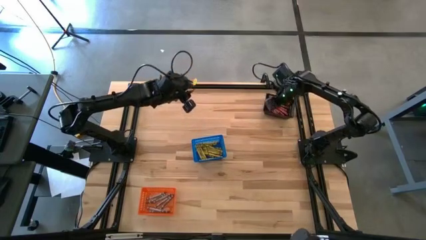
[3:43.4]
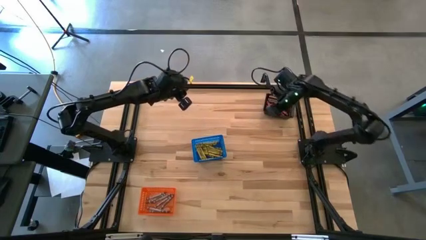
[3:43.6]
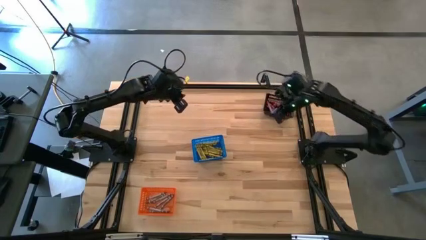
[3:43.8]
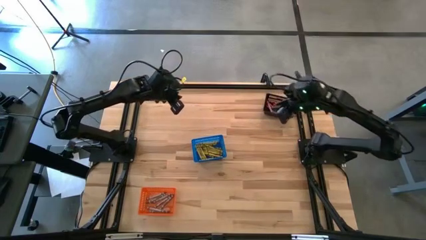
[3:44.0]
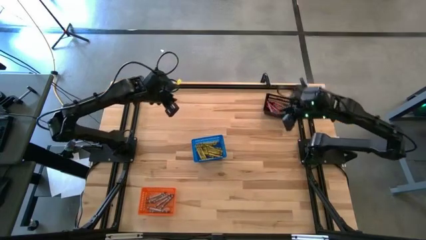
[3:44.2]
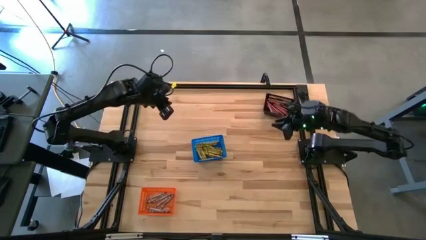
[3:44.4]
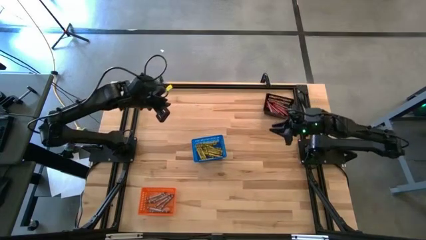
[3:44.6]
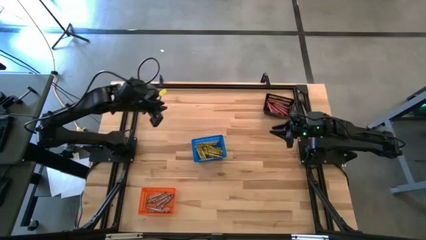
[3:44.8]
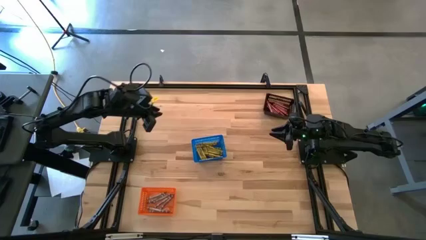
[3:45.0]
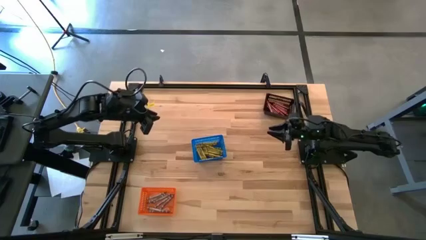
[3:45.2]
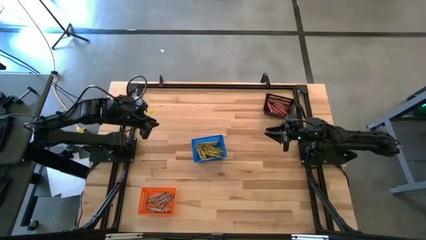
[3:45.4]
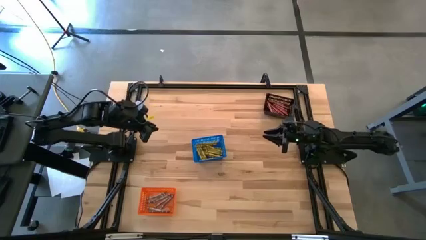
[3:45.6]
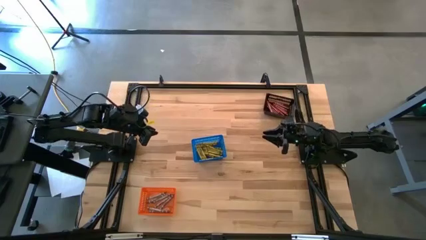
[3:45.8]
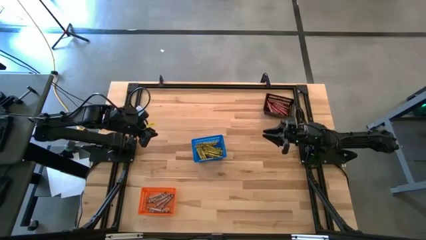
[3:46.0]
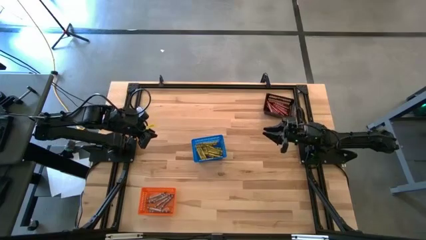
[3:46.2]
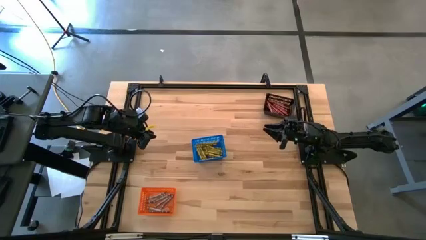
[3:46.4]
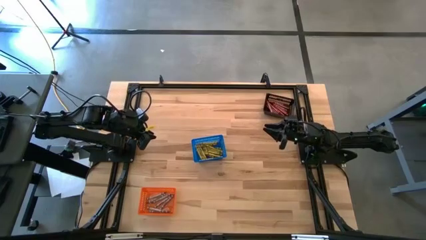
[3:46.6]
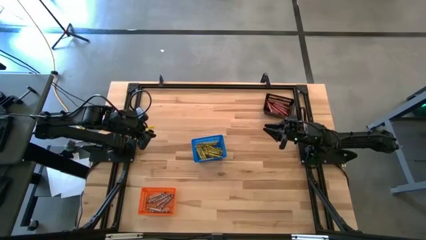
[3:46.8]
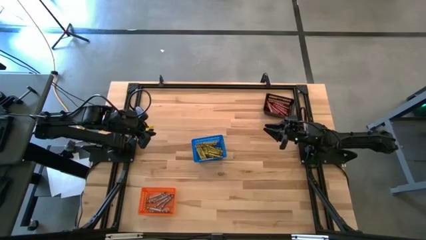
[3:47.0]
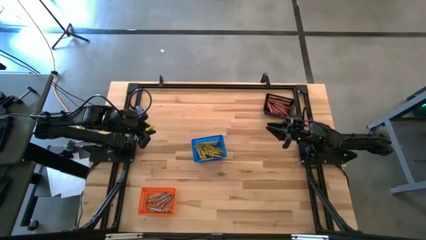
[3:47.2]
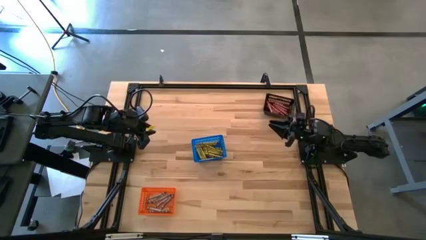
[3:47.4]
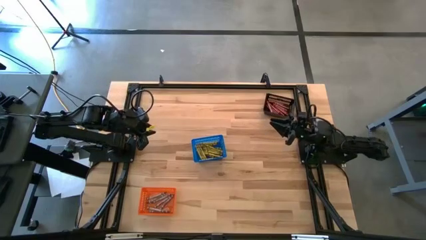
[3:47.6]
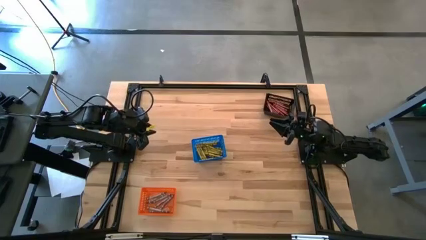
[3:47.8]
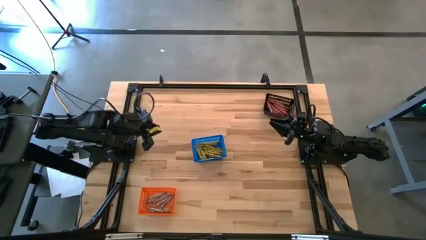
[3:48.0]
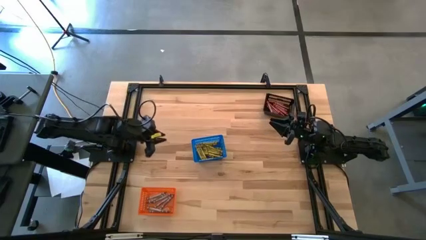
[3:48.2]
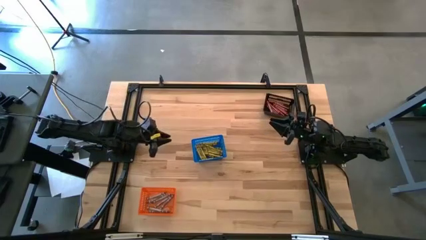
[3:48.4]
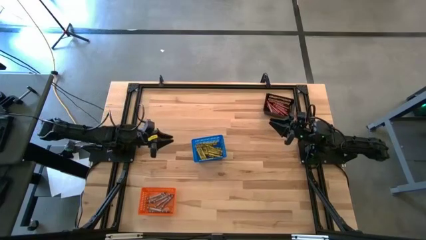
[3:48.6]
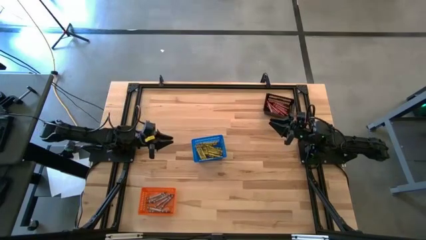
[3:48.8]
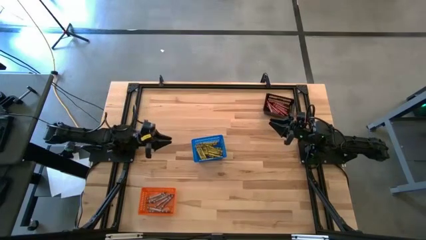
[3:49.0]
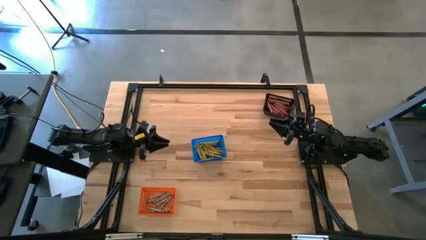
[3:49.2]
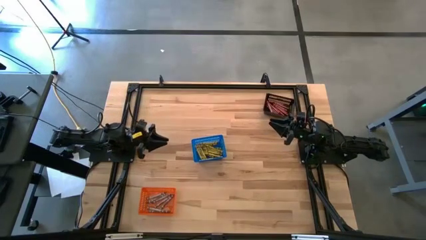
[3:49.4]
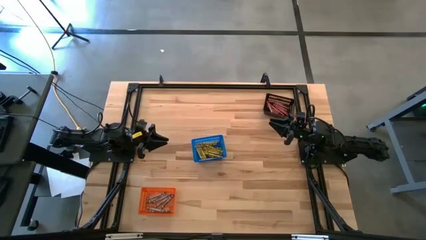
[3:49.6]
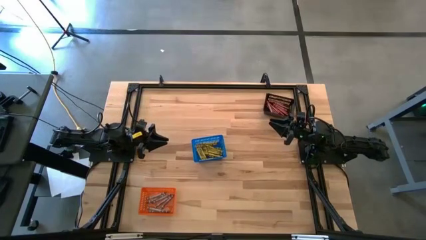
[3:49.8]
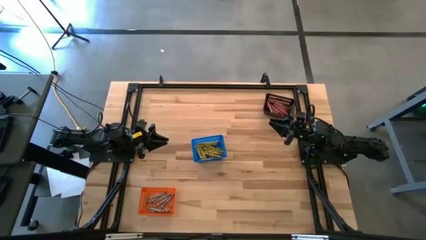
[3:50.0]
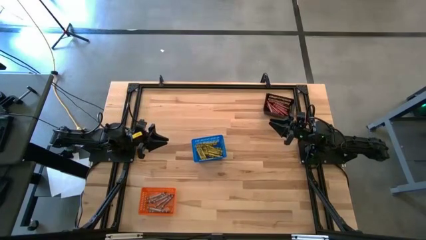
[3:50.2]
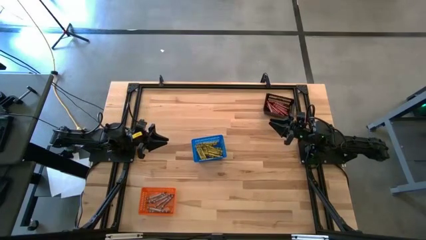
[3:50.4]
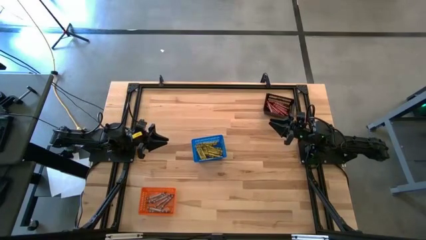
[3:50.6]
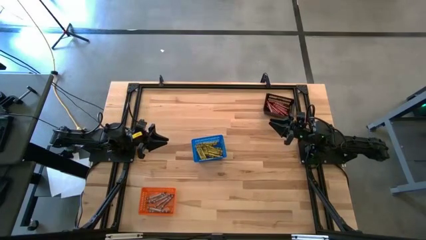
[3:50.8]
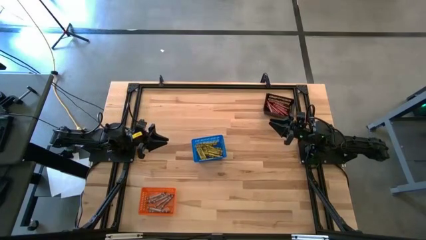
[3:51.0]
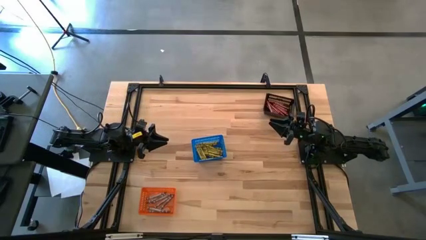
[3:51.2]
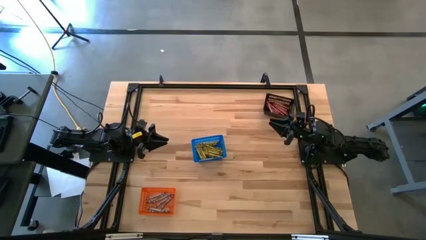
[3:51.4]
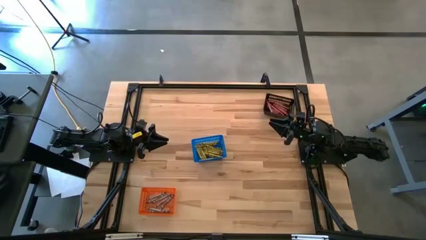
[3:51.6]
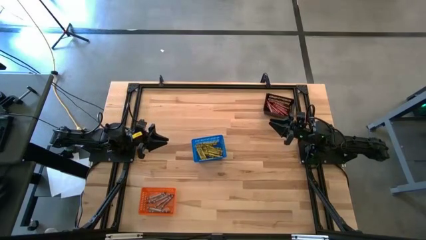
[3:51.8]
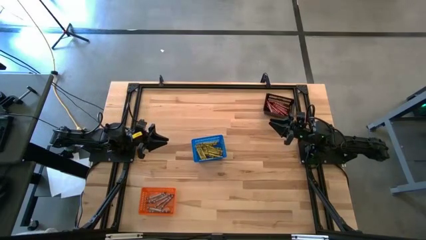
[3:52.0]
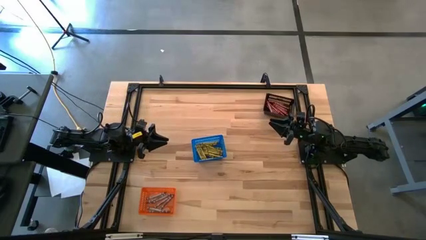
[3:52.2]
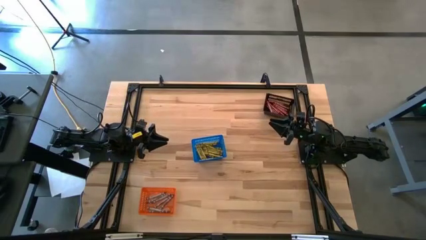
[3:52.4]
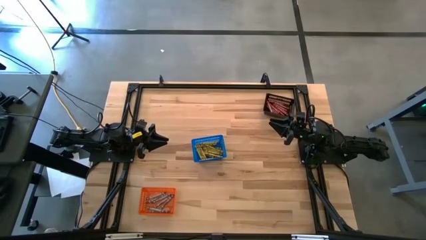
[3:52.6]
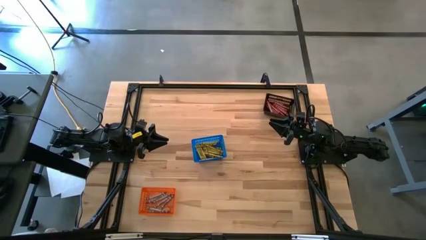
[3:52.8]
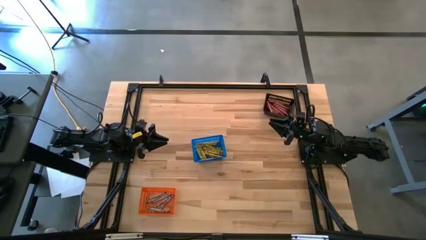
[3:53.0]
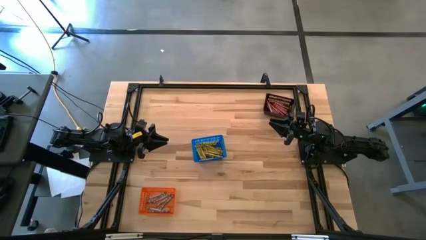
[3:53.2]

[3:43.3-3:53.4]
Task: Sort crayons
Return to Home Position

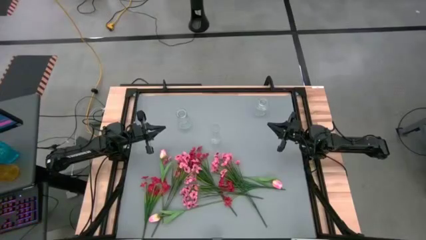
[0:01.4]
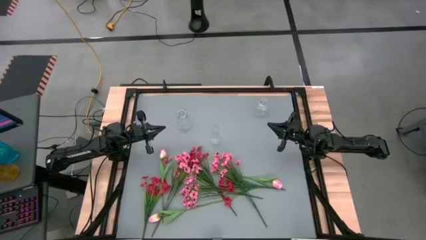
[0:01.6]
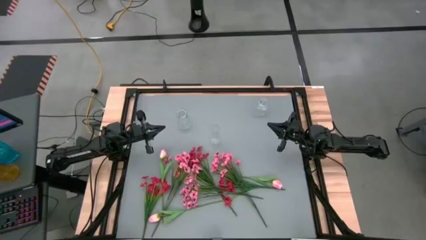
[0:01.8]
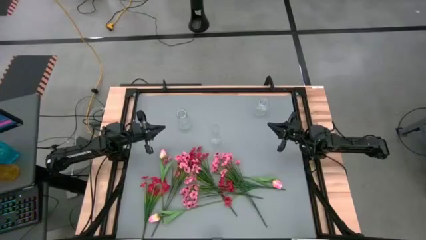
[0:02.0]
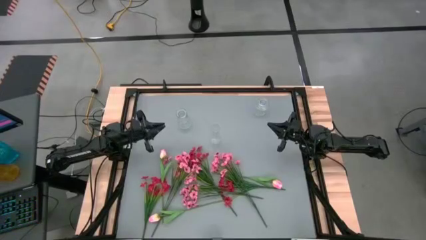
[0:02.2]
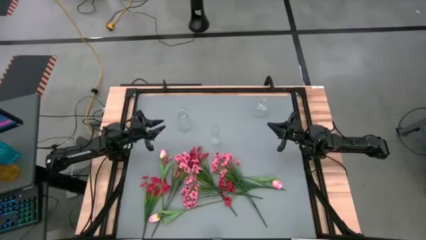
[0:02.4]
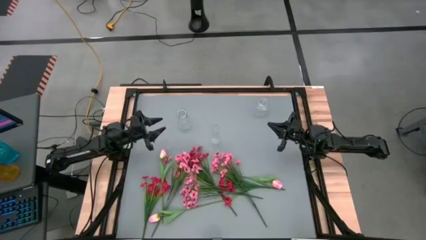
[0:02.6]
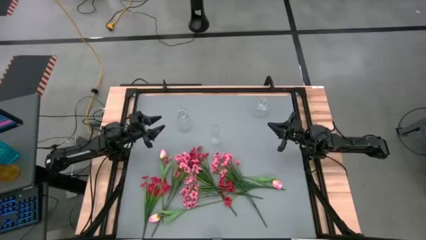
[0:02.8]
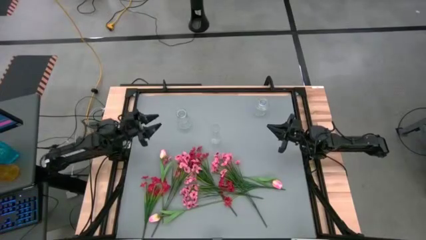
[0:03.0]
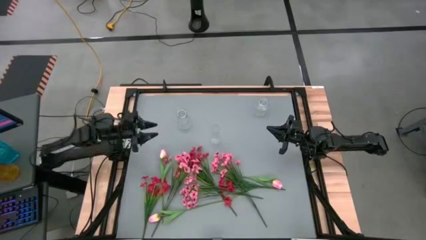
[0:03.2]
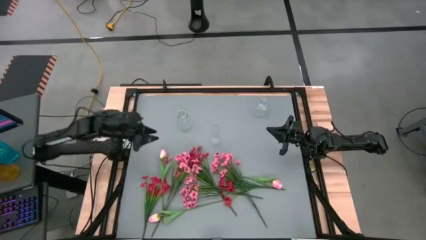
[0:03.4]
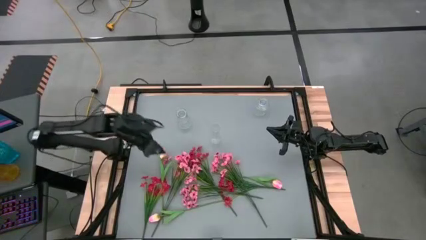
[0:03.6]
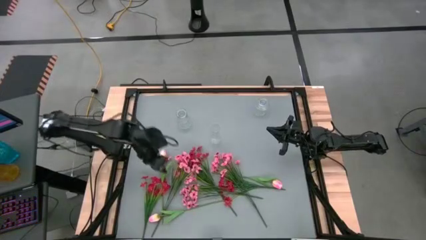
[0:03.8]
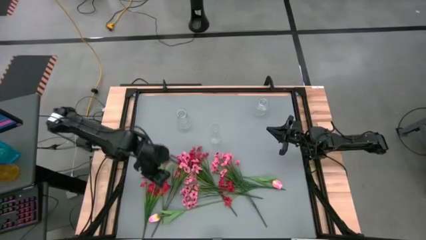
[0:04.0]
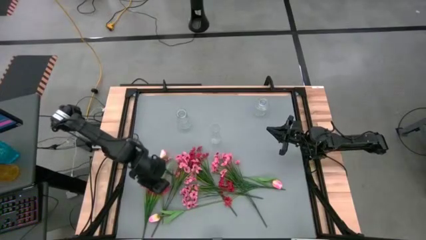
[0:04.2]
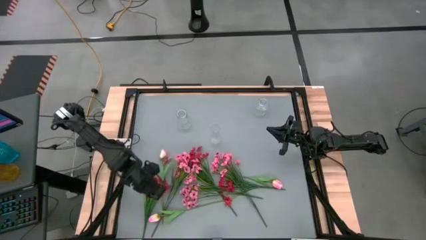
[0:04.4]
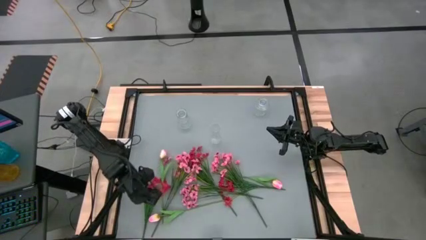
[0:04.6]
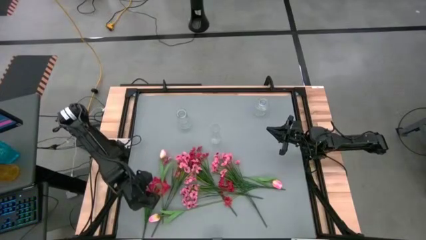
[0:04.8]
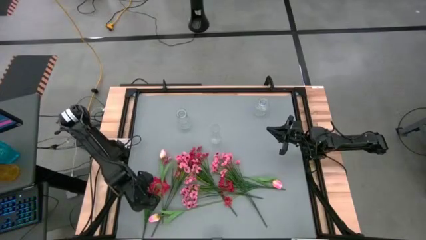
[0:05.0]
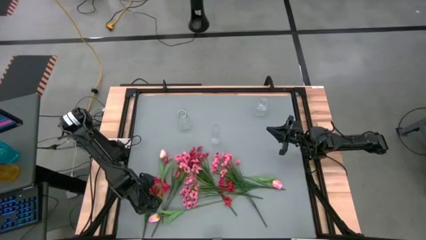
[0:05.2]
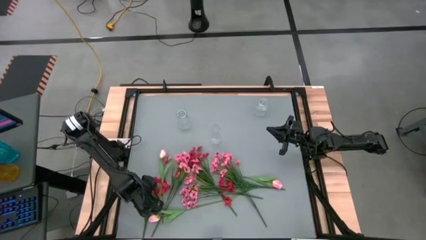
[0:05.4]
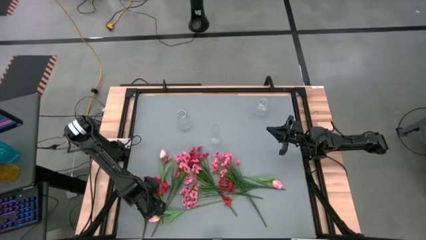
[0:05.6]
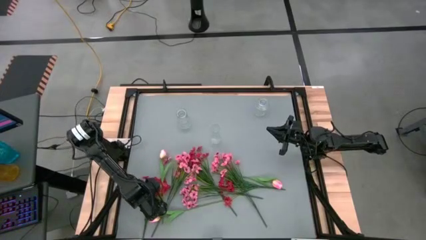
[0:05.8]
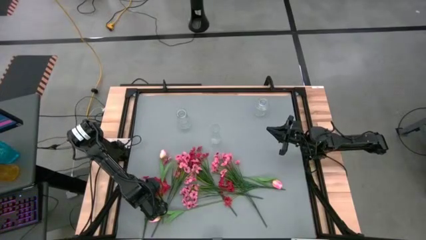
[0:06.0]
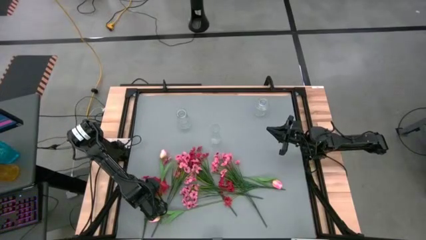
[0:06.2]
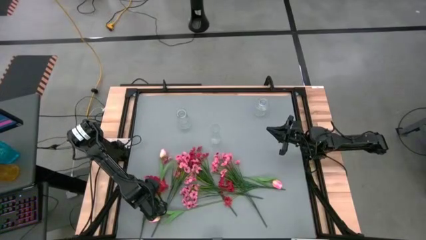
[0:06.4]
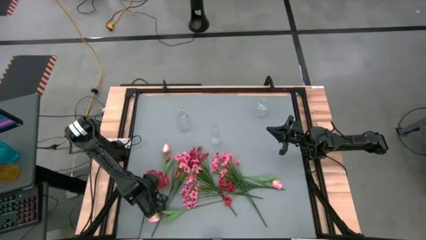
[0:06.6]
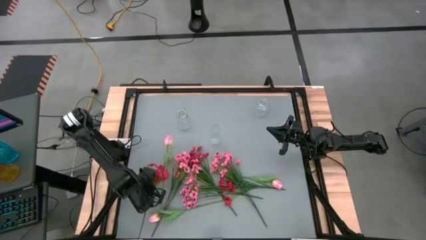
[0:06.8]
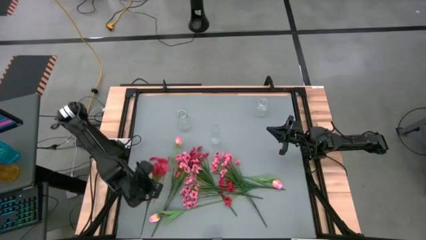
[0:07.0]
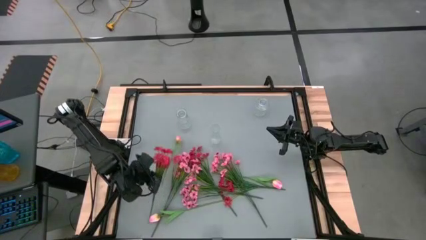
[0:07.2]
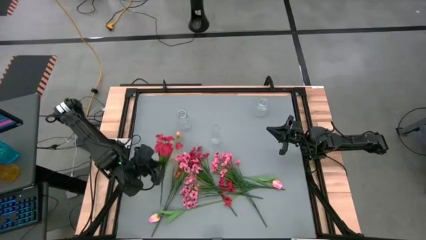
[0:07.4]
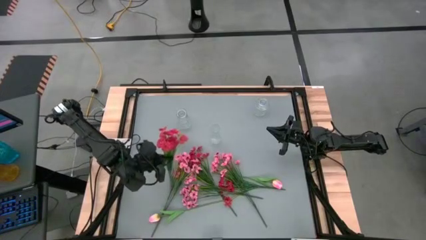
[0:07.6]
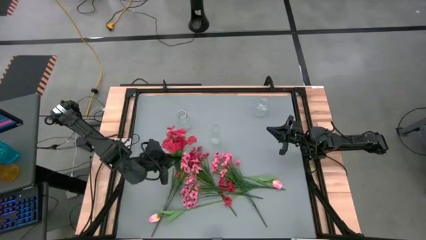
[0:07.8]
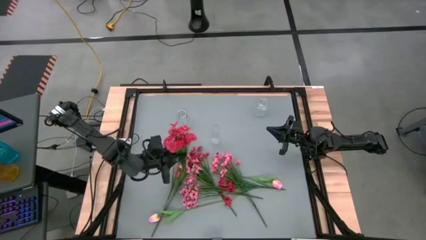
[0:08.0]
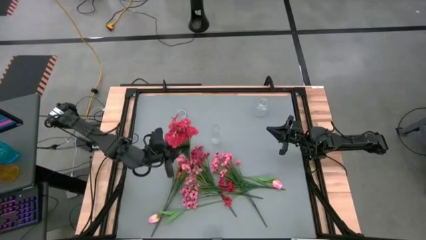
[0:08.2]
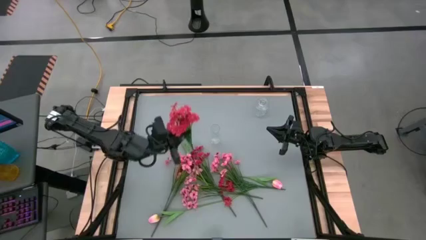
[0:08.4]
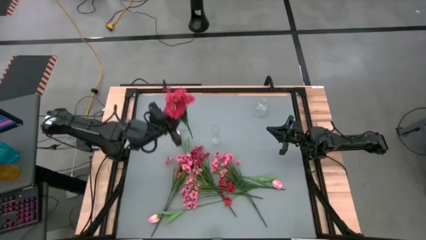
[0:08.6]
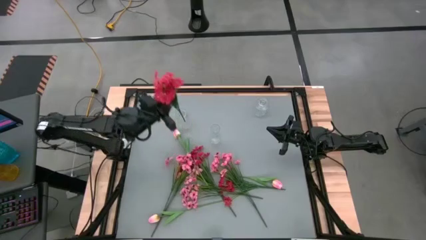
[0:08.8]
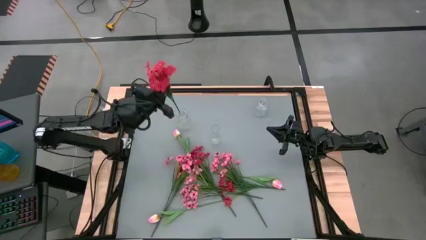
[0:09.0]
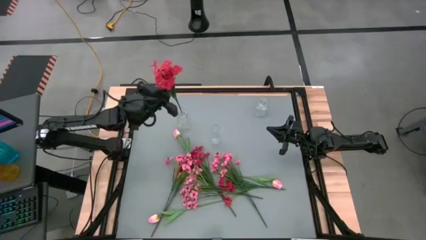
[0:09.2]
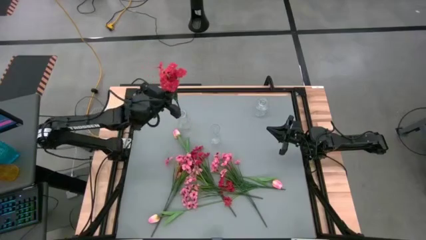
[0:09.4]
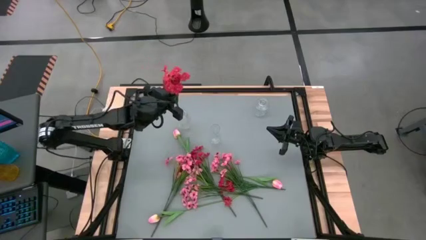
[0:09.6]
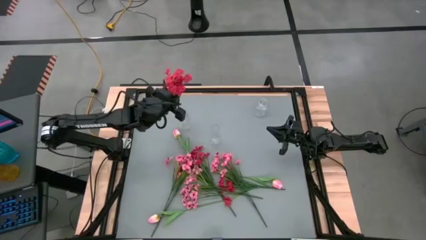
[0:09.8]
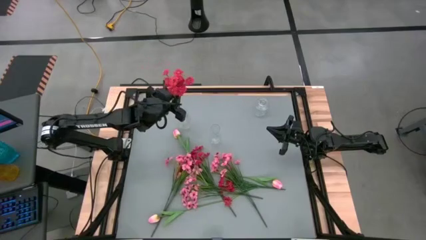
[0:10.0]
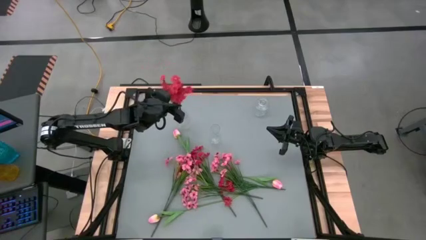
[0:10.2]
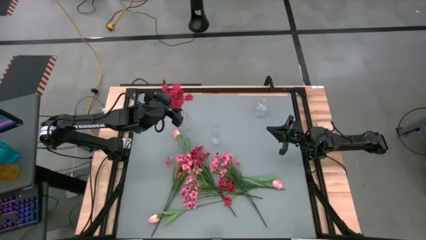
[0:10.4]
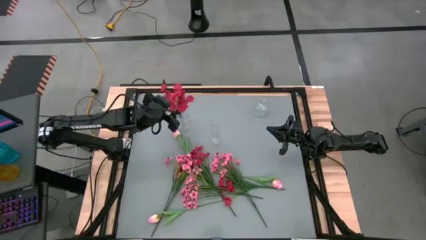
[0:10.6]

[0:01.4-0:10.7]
Task: Sort flowers into vase by color
Put the red flower into the top left transparent vase
